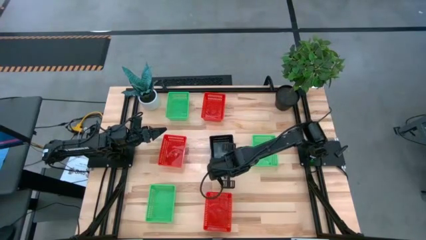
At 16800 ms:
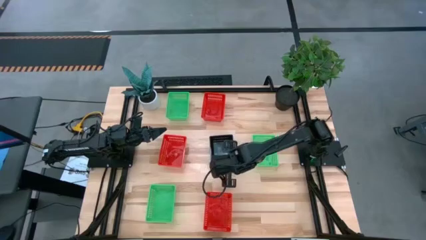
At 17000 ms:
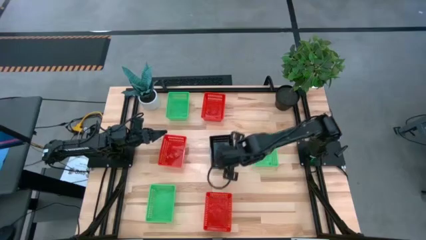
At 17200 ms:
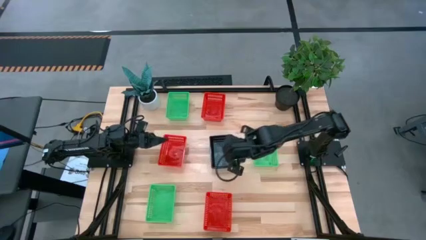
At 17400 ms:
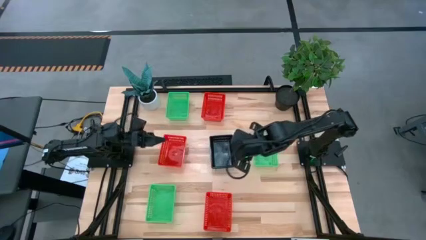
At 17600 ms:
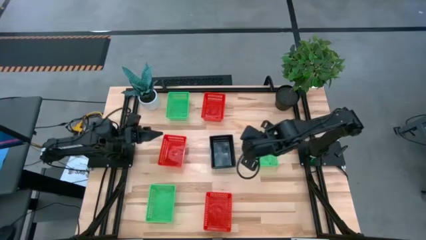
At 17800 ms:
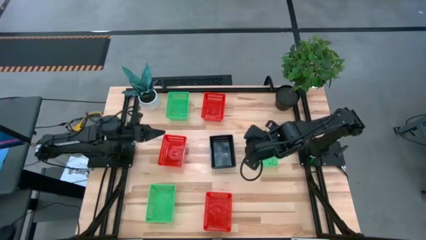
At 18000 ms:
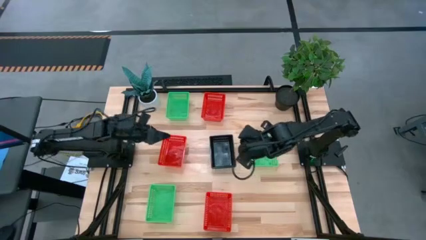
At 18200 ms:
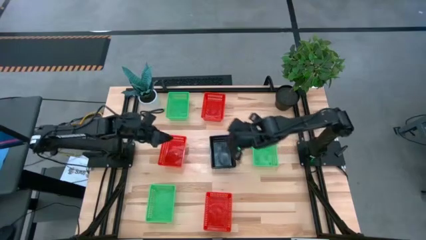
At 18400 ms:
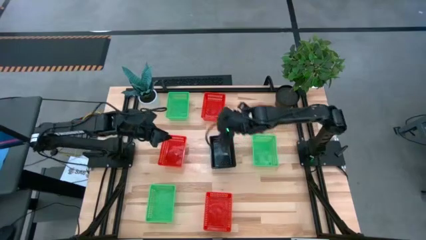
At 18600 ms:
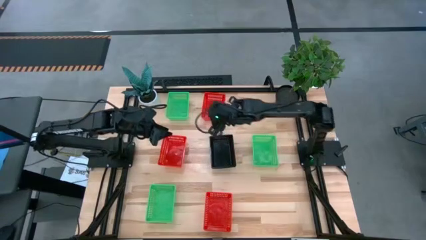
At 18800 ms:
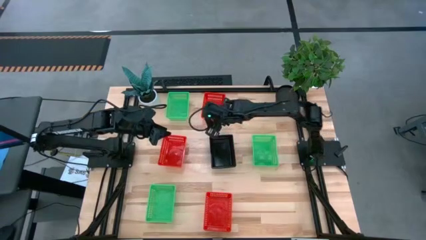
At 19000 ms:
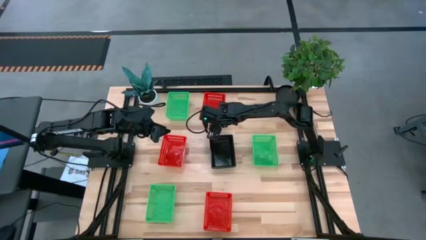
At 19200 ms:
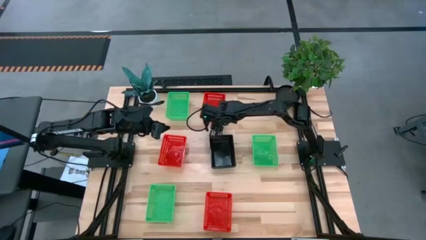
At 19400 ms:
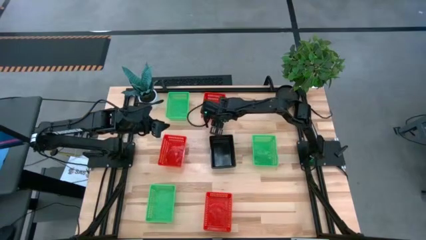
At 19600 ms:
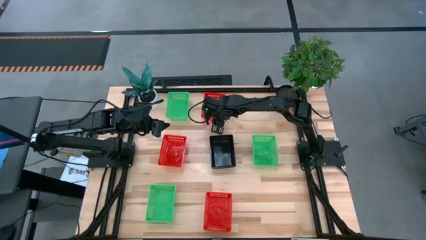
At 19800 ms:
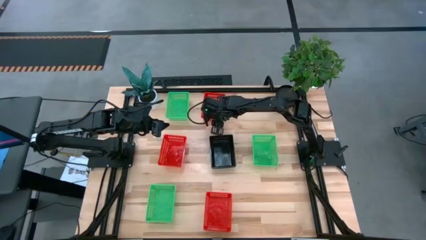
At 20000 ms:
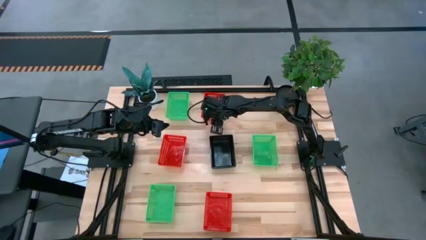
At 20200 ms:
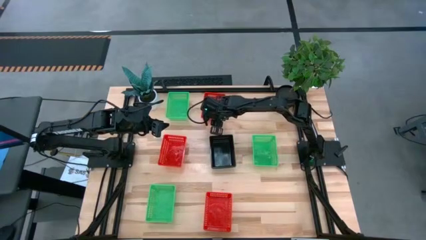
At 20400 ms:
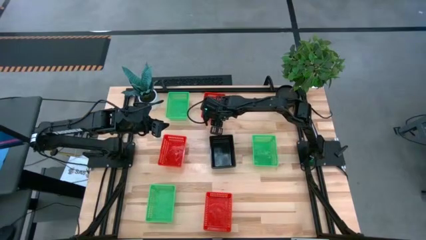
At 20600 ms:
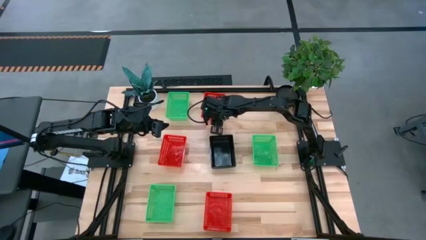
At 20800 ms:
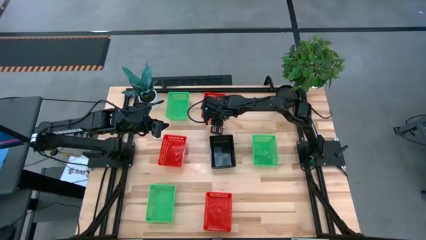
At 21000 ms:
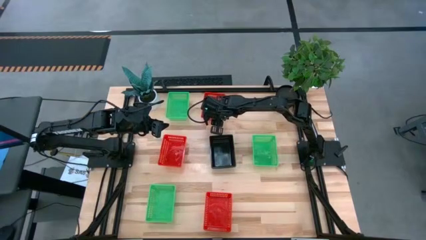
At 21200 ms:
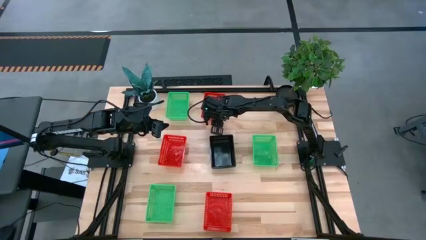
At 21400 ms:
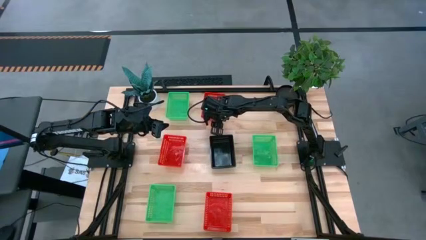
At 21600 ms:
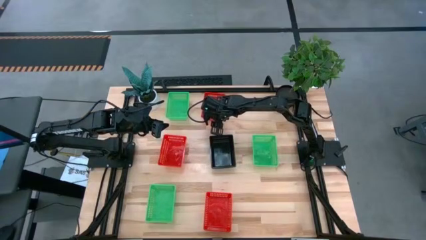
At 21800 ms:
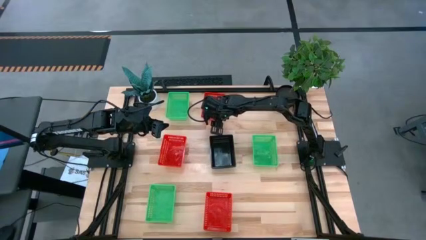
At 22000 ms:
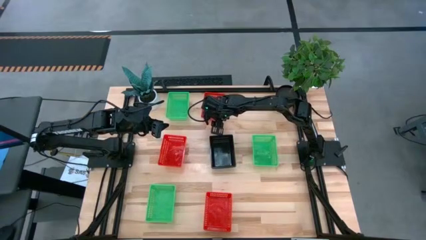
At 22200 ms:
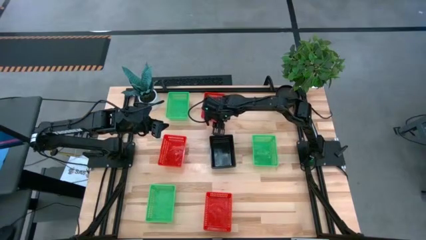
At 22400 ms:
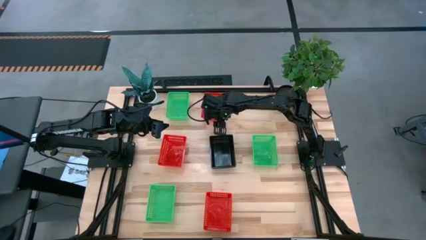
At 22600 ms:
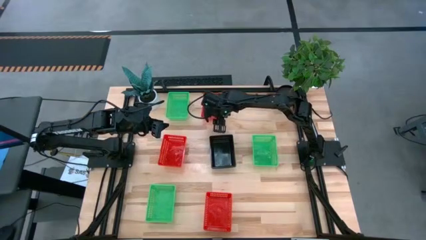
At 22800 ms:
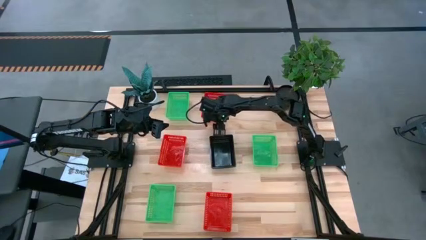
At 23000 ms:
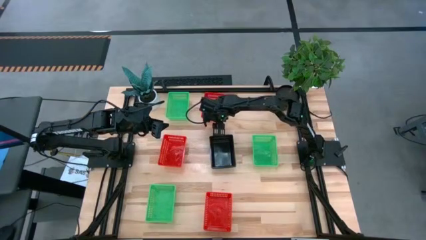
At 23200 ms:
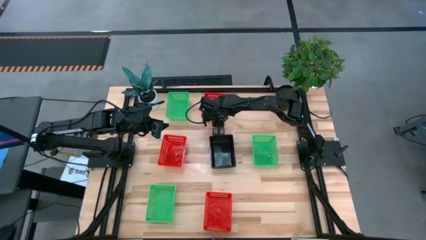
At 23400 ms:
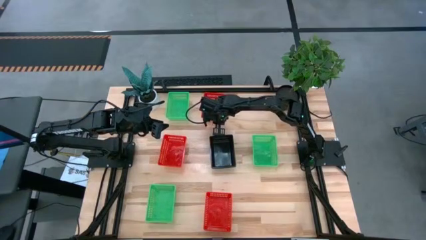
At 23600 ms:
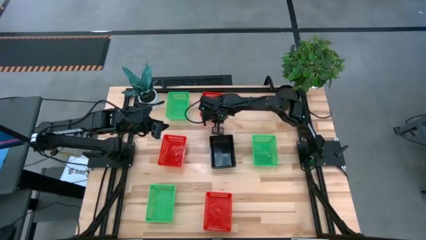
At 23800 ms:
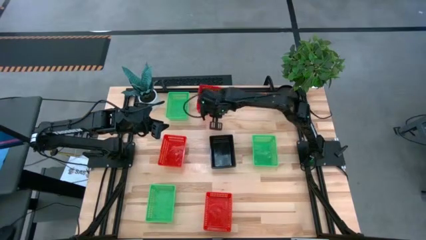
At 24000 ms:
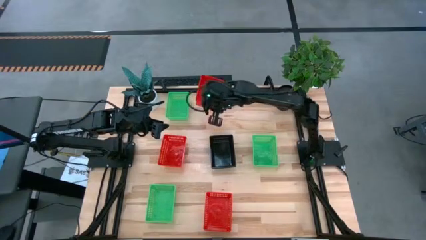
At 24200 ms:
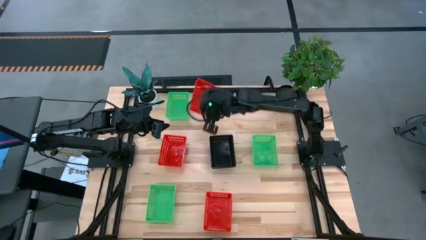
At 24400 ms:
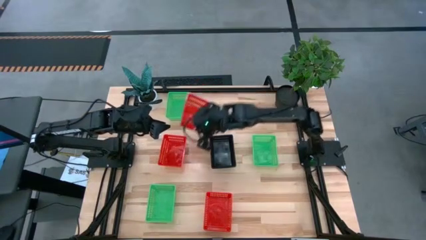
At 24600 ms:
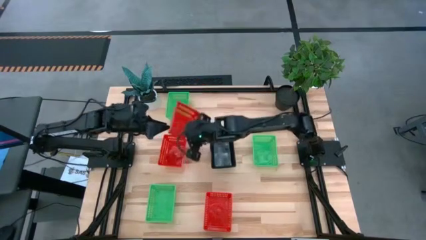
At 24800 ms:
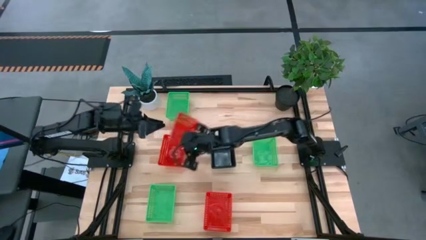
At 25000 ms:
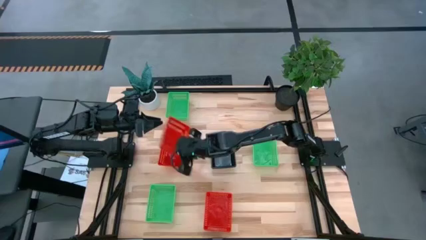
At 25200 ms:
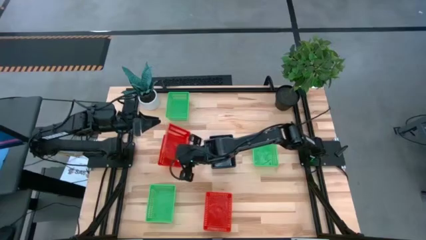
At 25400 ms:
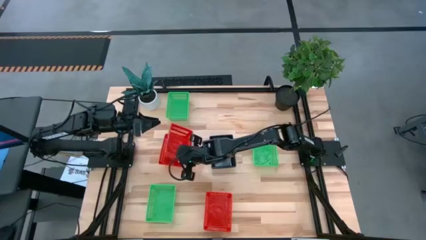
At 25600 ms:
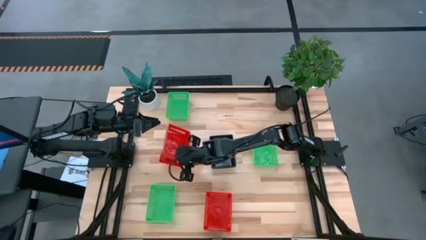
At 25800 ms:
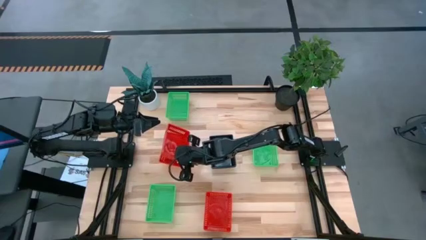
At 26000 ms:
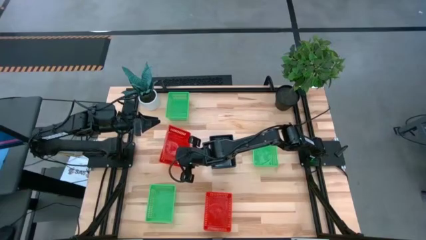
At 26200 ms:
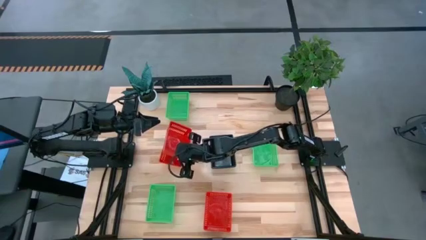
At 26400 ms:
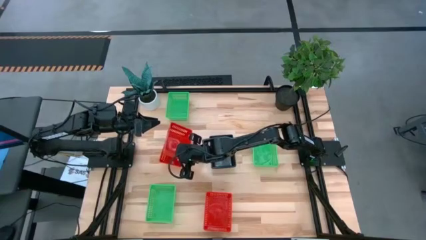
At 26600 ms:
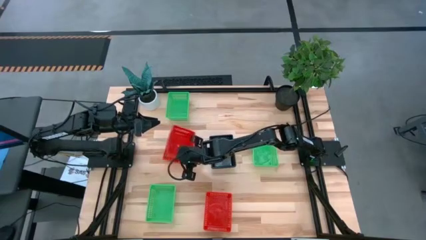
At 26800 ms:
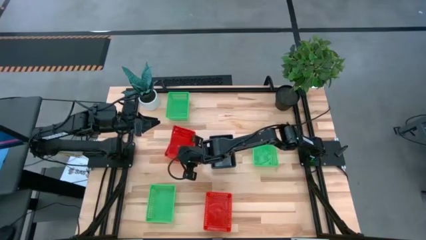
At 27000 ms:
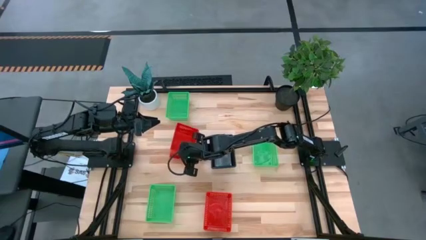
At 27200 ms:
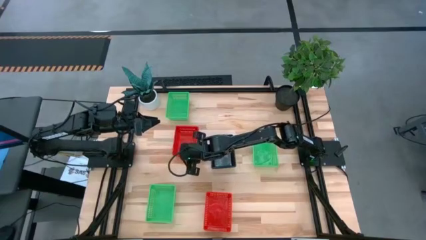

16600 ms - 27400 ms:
Stack the top red basket on the middle red basket

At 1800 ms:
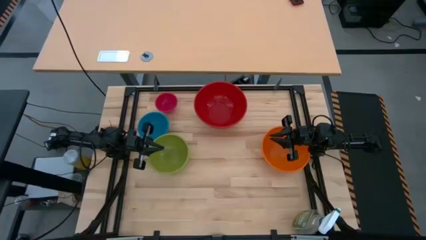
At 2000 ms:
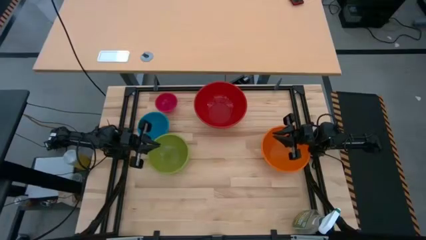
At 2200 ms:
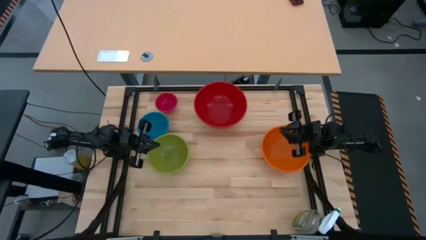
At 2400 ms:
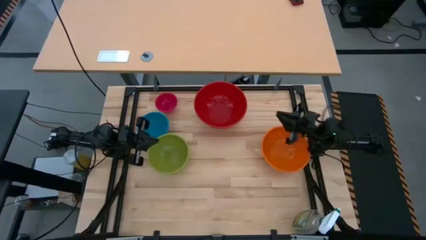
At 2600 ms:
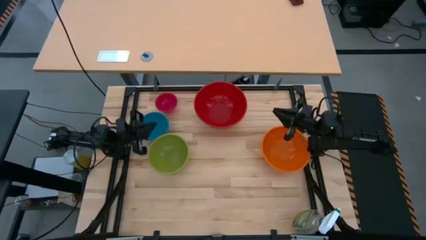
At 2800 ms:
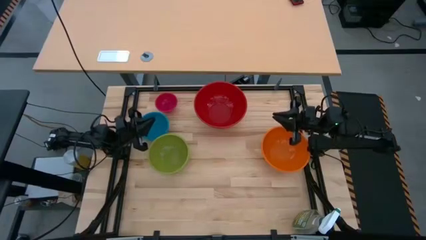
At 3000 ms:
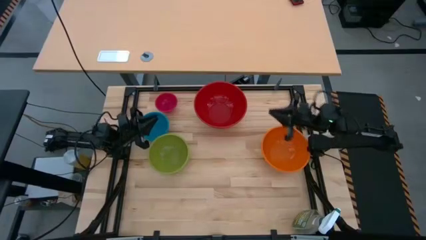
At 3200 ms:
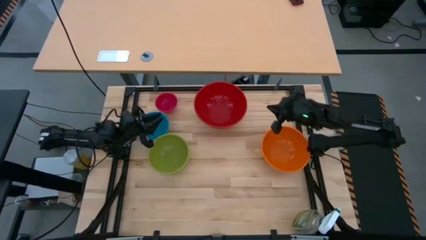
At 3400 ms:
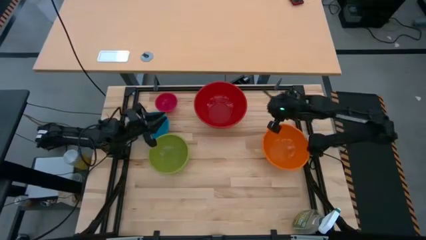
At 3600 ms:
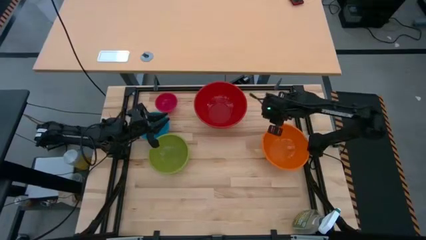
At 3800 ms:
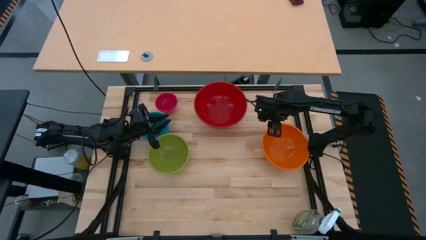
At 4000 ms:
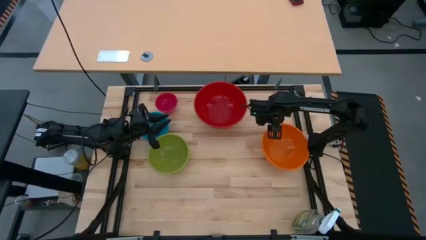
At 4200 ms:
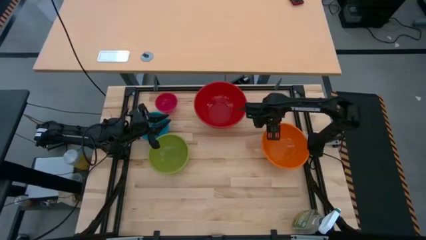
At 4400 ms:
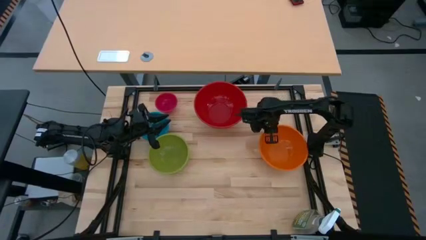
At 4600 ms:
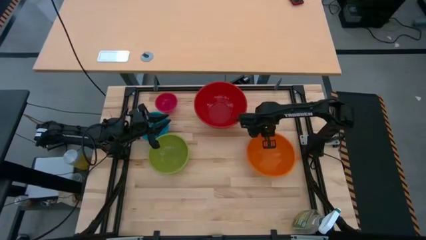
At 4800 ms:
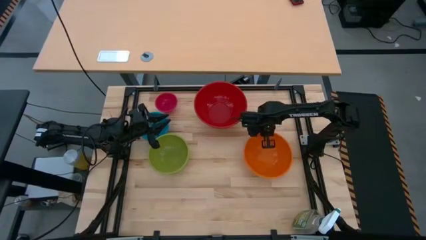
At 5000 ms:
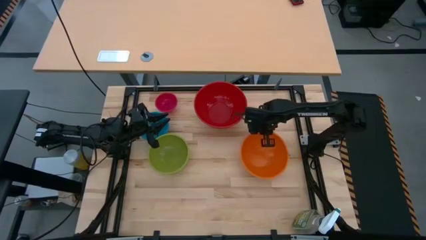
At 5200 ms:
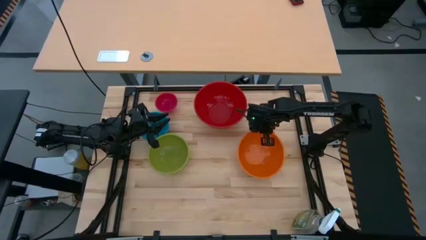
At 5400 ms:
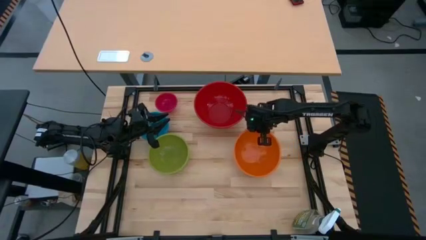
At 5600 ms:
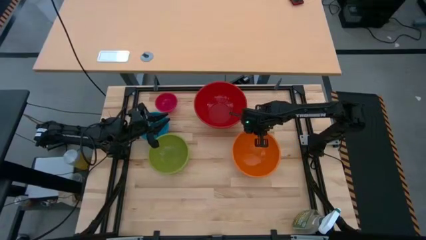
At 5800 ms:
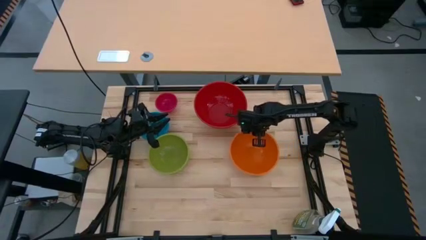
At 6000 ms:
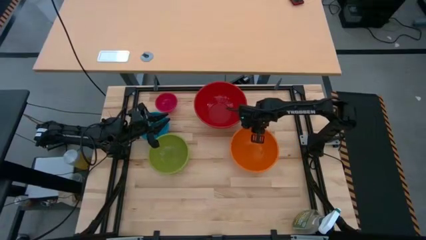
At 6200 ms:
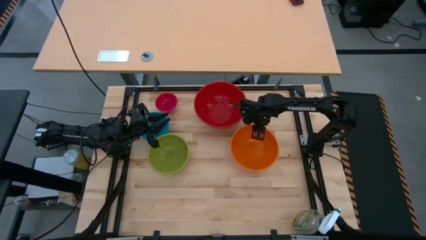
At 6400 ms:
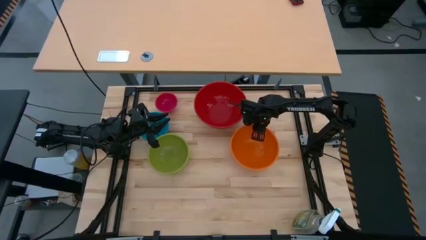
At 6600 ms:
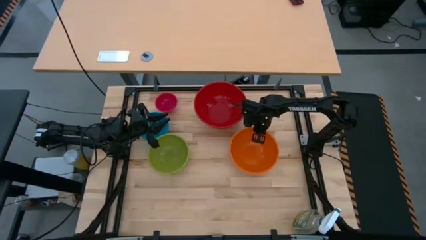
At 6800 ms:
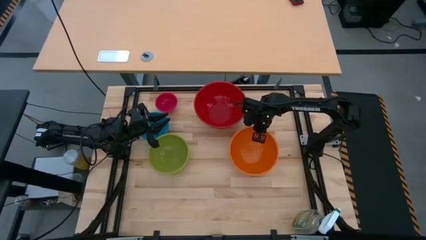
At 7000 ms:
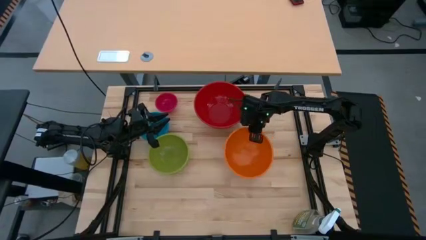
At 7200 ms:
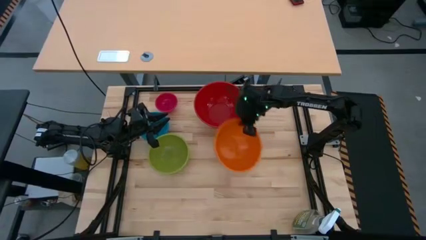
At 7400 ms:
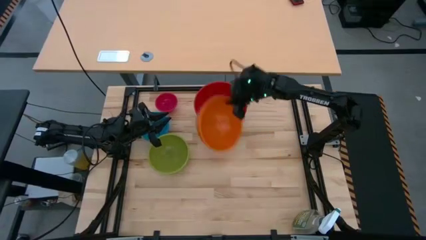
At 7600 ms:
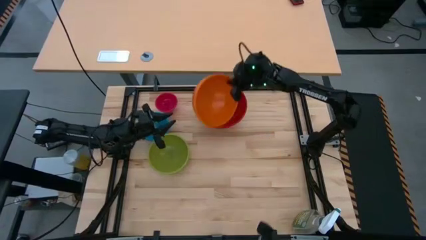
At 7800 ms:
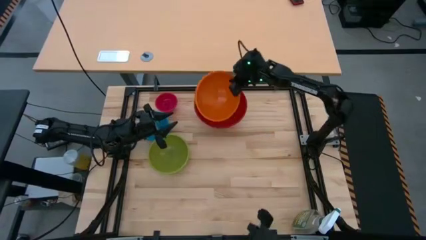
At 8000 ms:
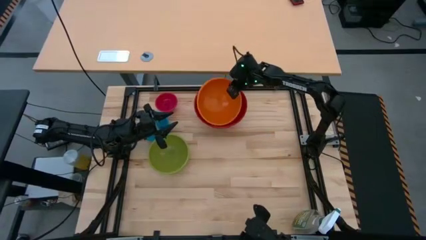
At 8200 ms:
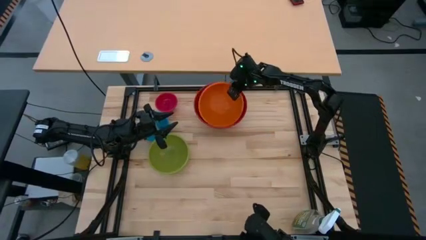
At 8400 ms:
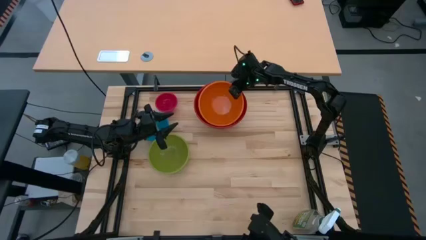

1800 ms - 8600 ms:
Stack the orange bowl on top of the red bowl
